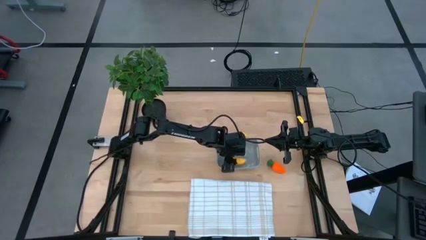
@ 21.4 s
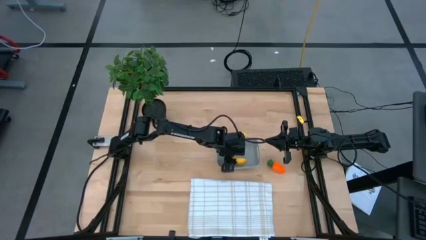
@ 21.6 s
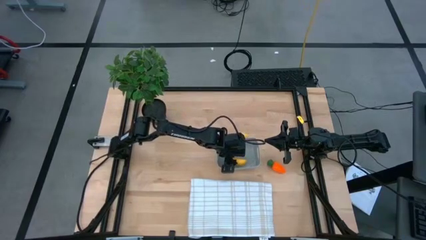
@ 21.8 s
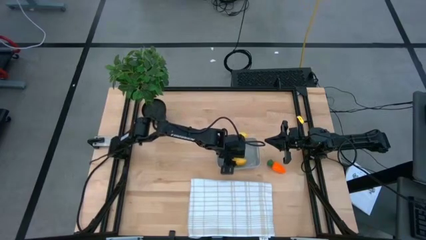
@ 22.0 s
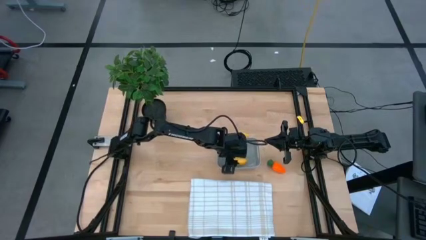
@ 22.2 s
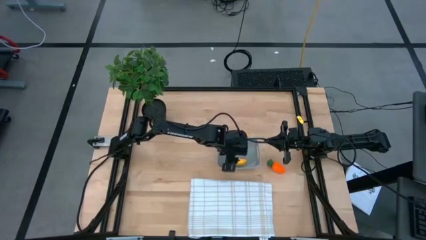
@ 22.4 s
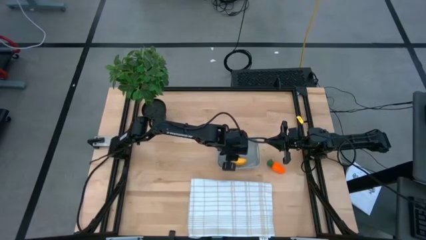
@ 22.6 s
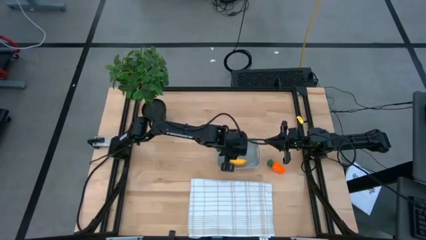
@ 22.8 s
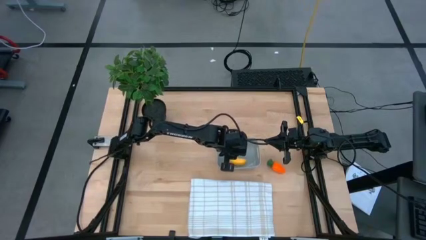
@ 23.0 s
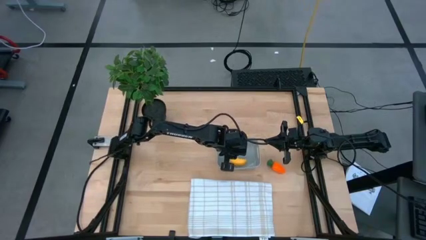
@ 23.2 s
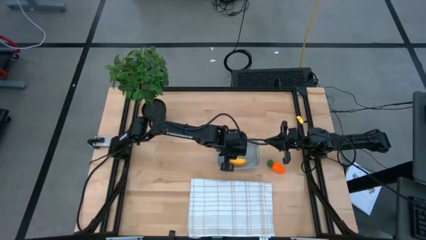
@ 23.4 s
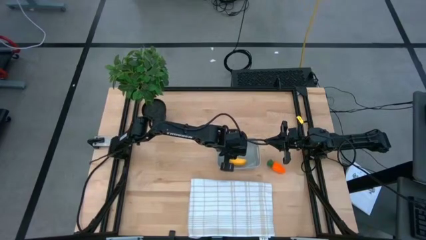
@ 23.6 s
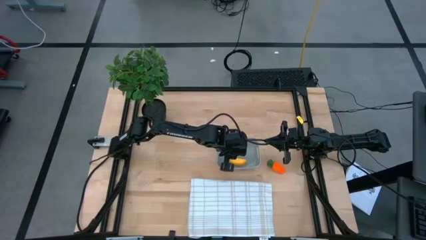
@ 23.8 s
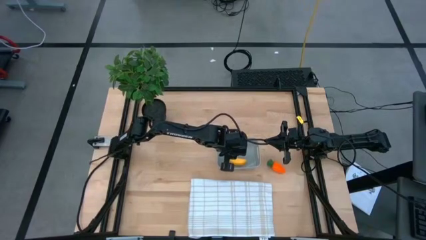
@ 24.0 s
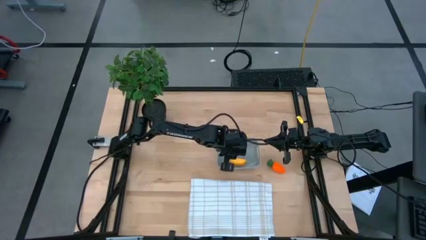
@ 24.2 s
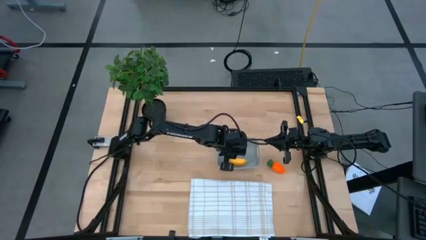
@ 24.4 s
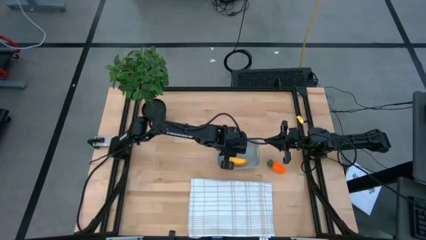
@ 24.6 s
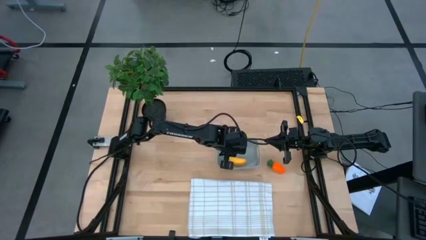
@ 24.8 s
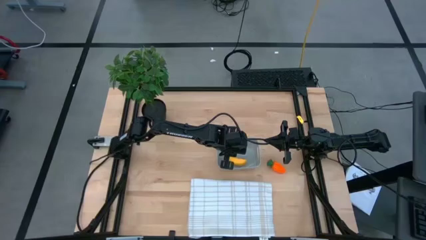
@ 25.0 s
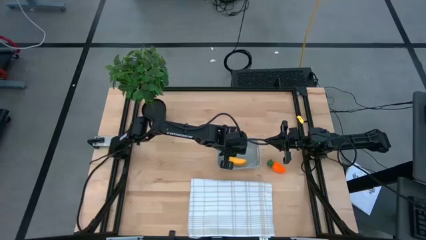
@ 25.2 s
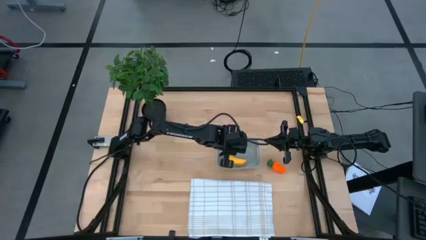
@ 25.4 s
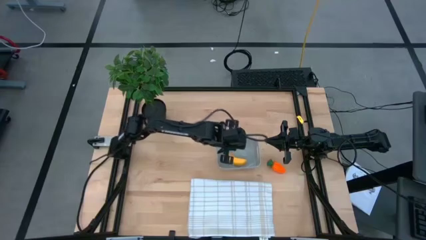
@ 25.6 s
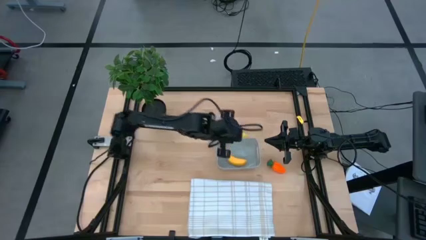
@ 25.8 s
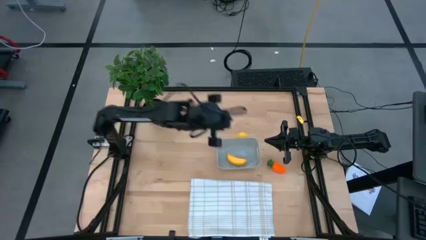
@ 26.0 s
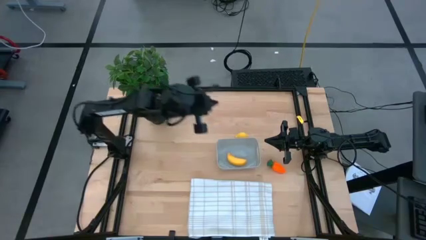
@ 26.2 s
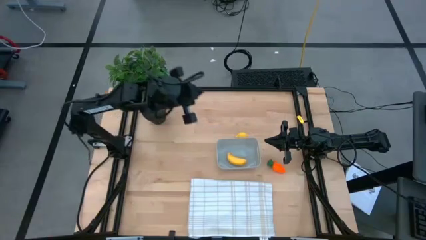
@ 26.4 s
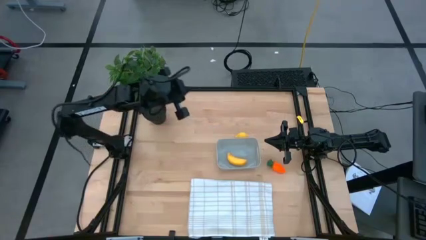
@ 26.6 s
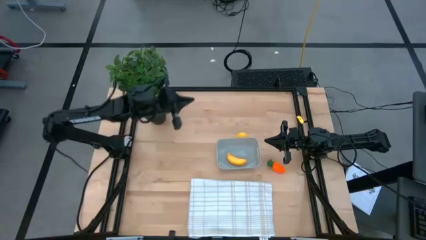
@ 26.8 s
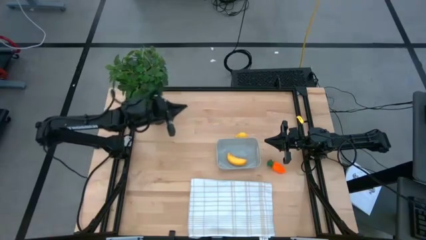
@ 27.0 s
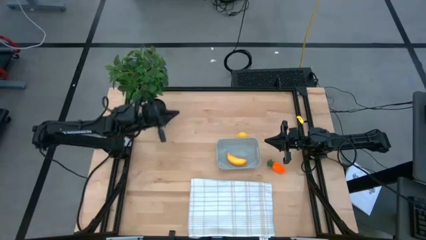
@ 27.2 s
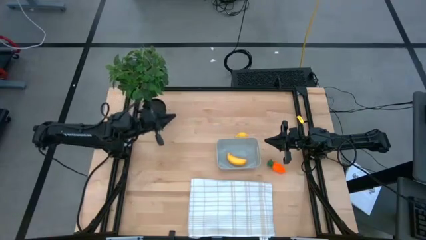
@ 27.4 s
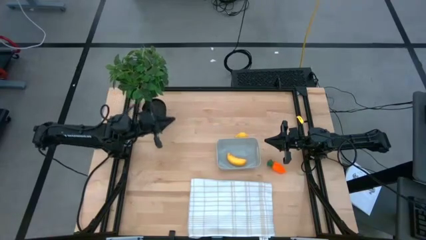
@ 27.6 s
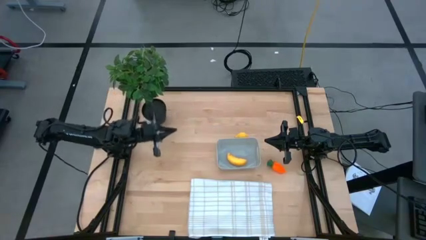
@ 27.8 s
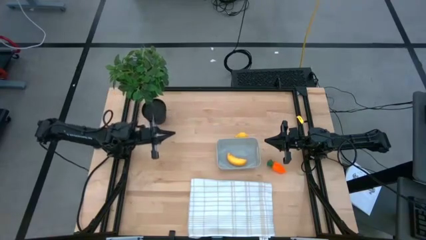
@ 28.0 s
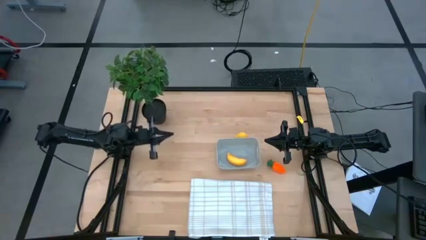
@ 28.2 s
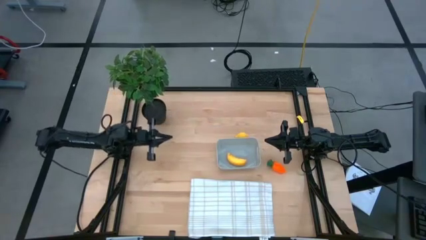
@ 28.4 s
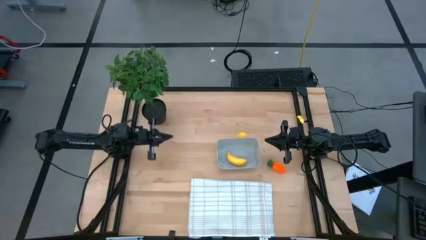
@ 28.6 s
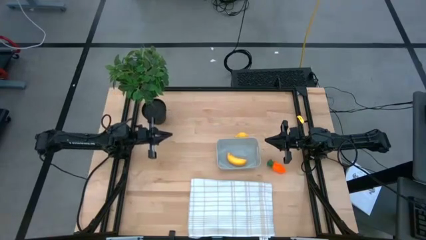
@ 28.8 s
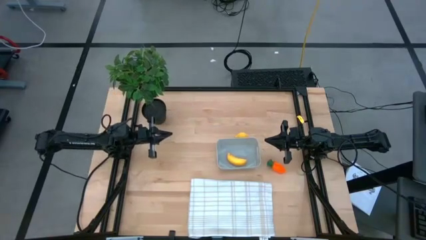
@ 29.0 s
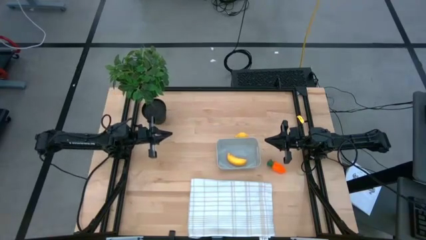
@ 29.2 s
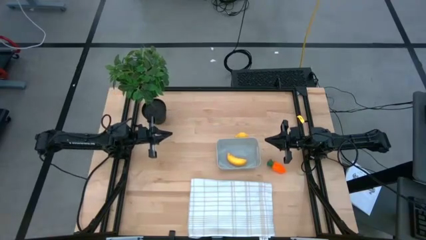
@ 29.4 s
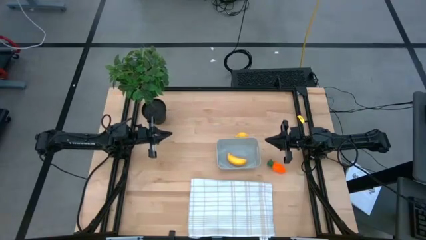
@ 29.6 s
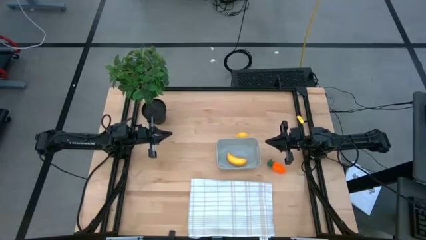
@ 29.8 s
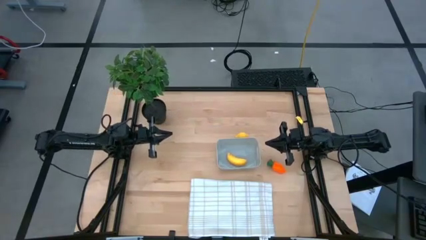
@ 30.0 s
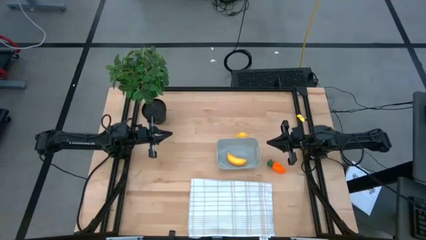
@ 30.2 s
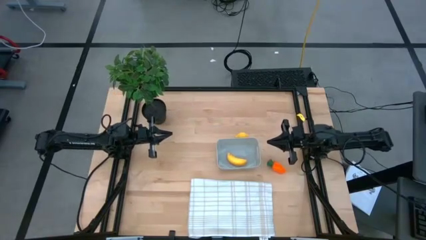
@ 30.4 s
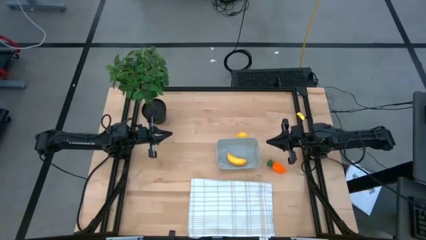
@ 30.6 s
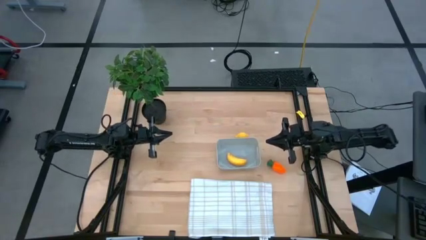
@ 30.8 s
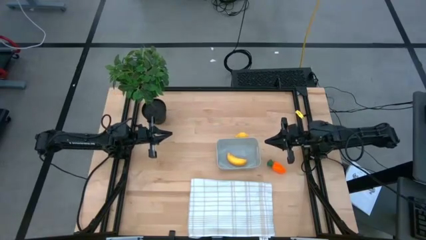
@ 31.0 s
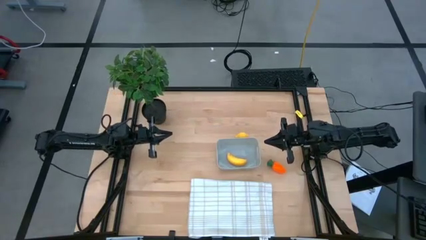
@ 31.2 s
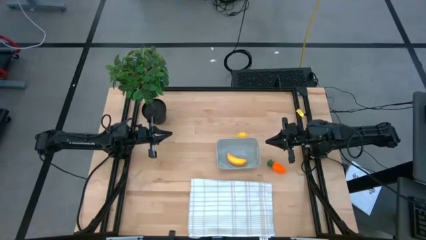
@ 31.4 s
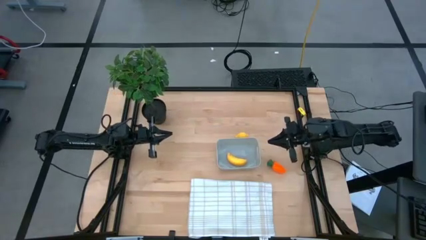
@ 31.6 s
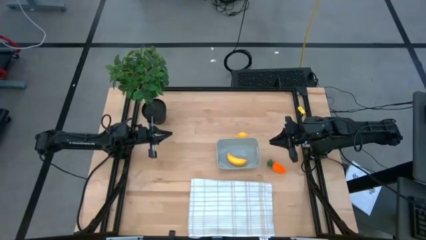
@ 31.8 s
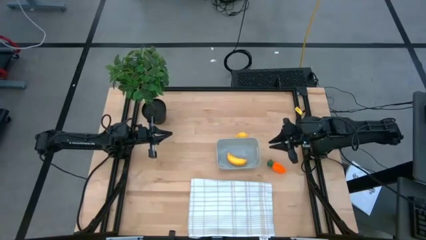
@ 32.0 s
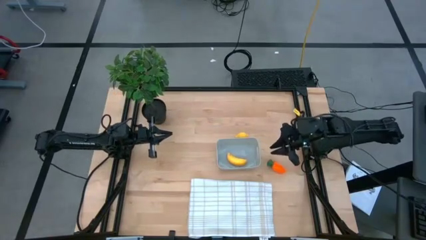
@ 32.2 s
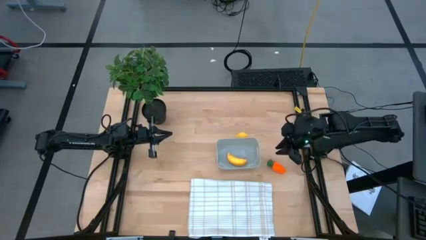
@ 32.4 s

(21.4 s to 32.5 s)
Task: Pick and placing Produce into tupperware
Put the orange carrot into the gray bin
